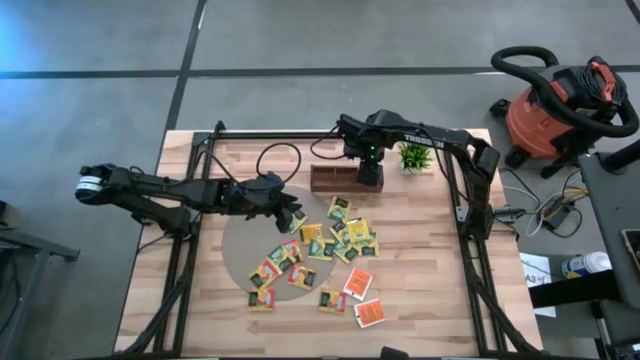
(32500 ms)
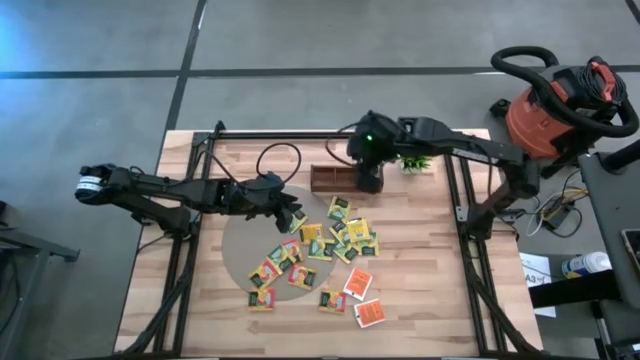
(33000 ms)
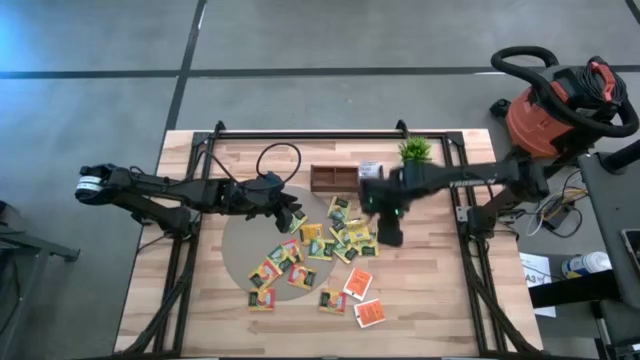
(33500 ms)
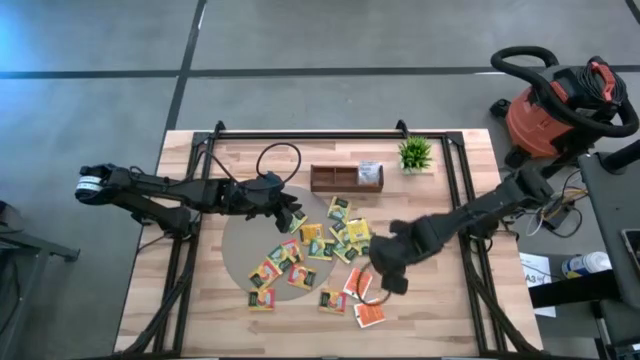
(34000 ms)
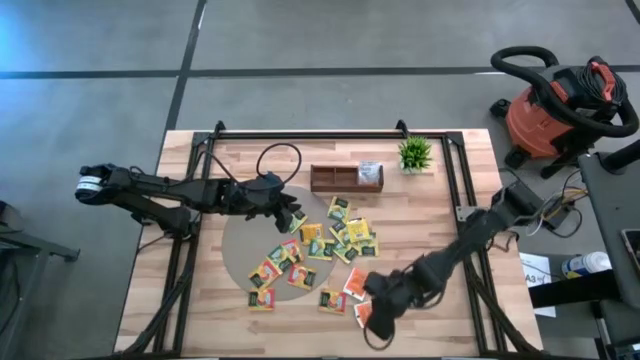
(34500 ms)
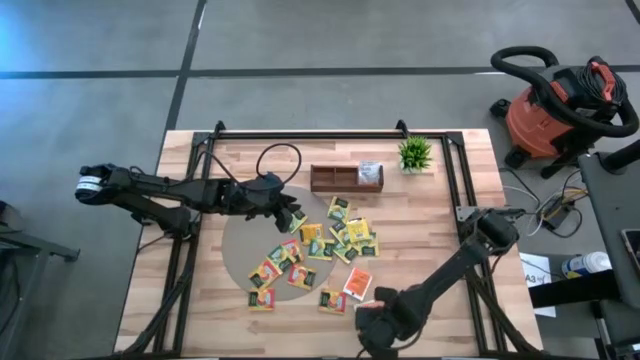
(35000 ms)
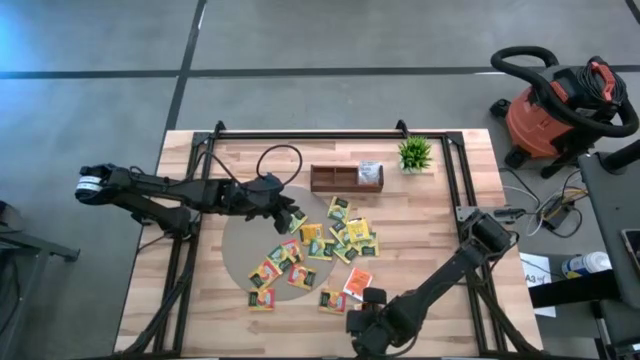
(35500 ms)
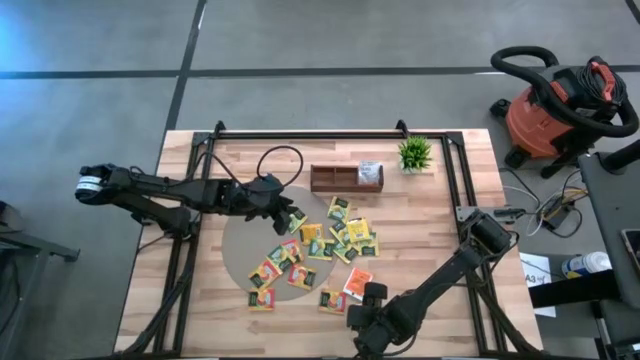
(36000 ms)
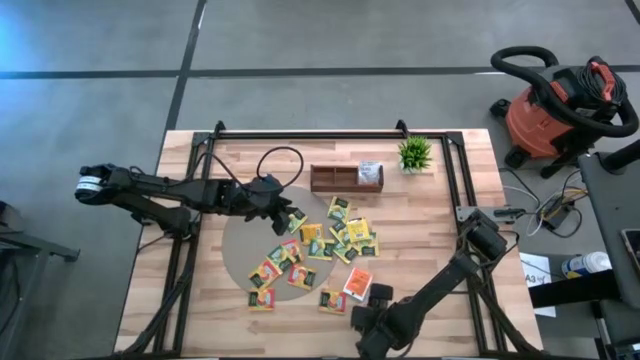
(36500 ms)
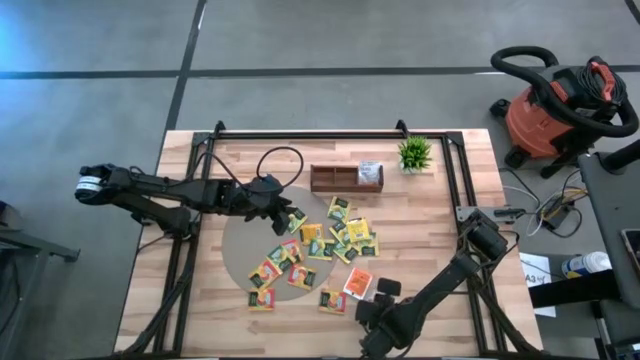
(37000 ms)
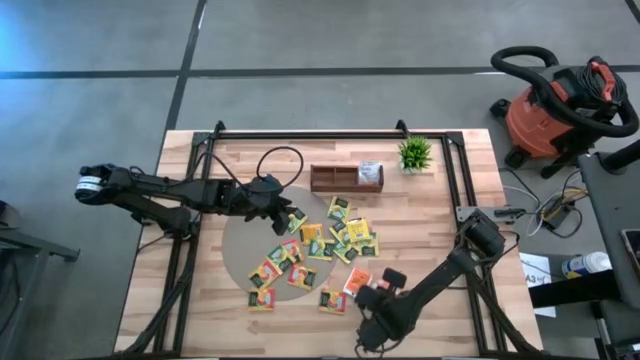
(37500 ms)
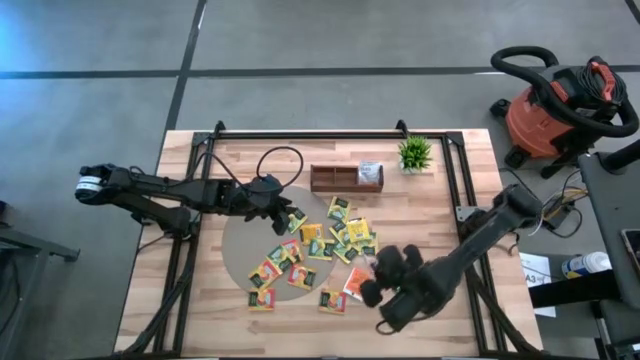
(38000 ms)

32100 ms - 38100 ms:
Task: Pick & Place Tea
Put the orange tea sachet into the right compartment of the wooden organizer

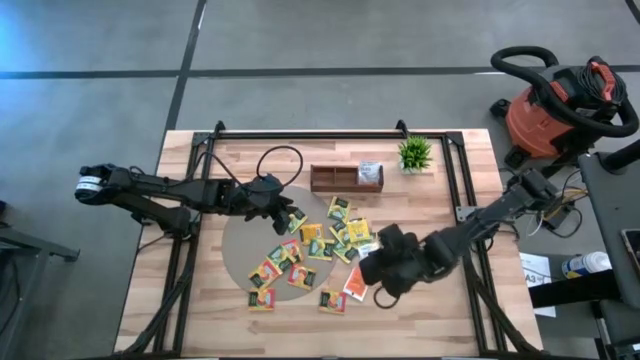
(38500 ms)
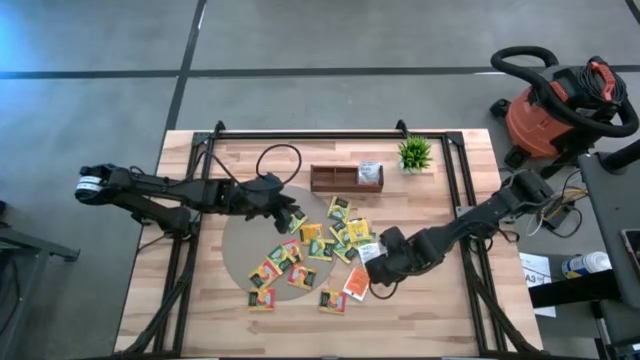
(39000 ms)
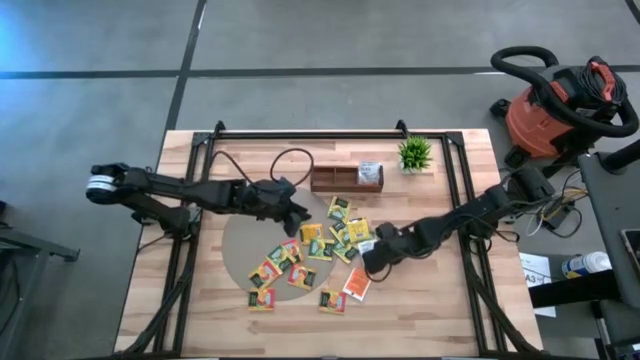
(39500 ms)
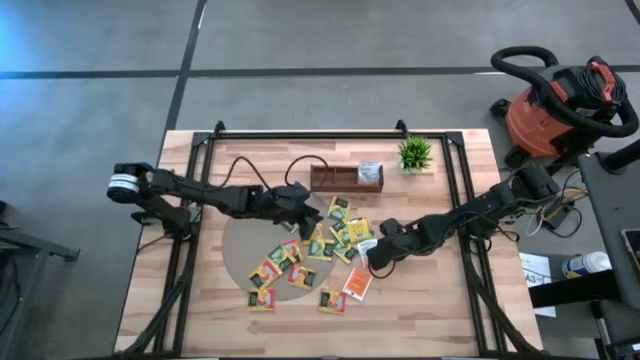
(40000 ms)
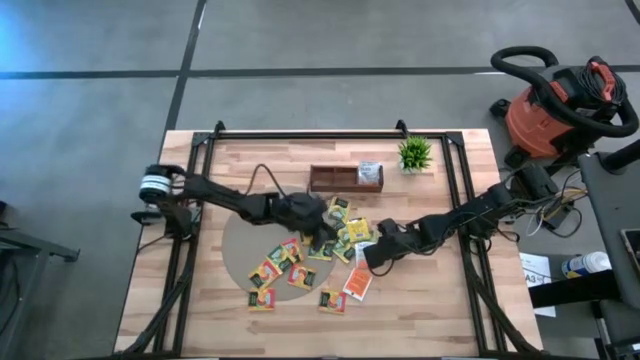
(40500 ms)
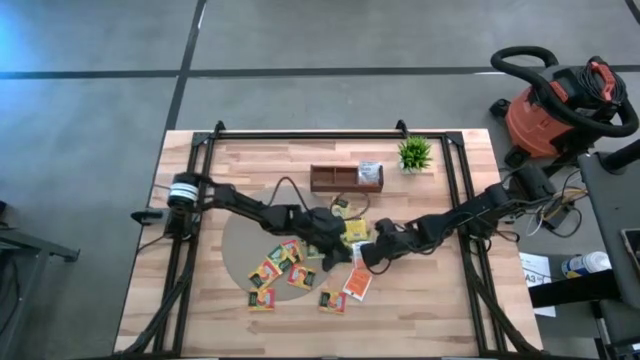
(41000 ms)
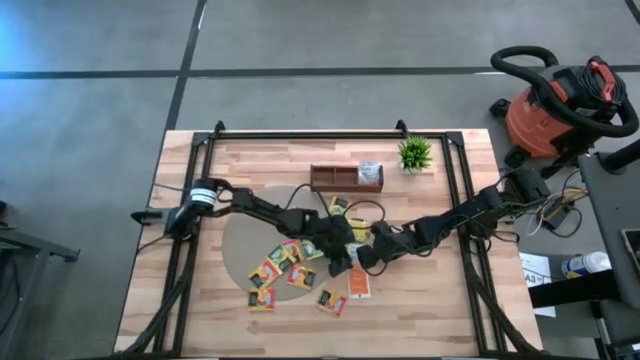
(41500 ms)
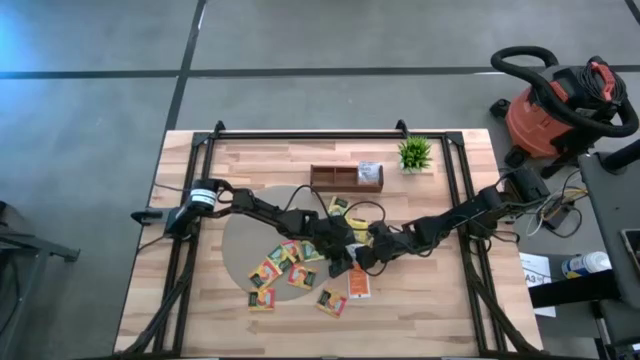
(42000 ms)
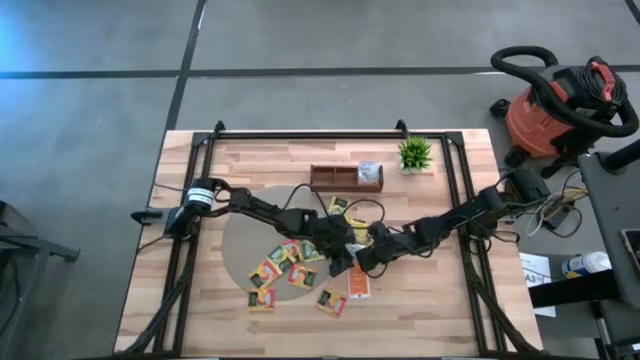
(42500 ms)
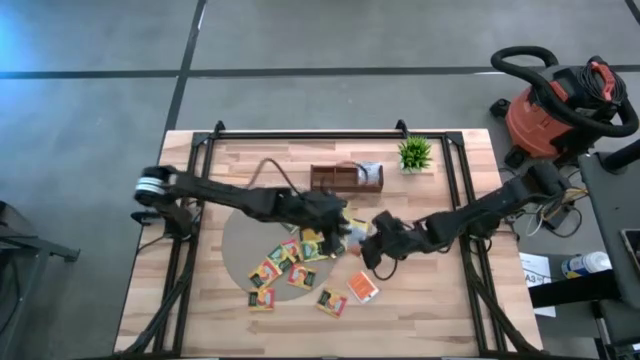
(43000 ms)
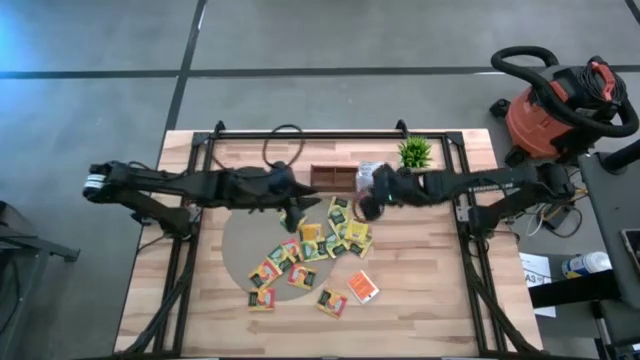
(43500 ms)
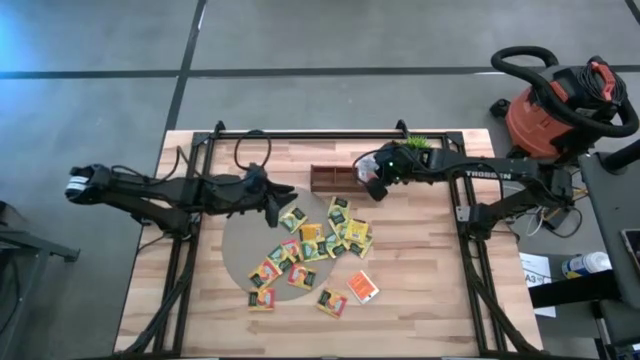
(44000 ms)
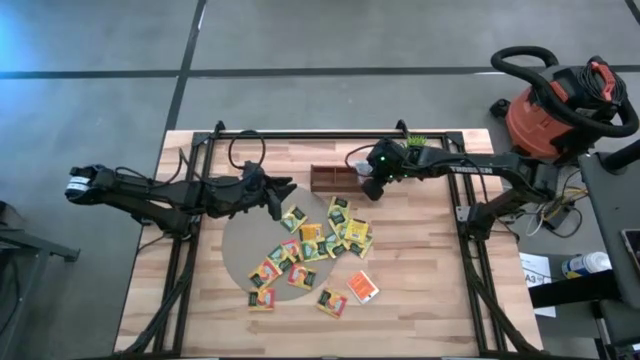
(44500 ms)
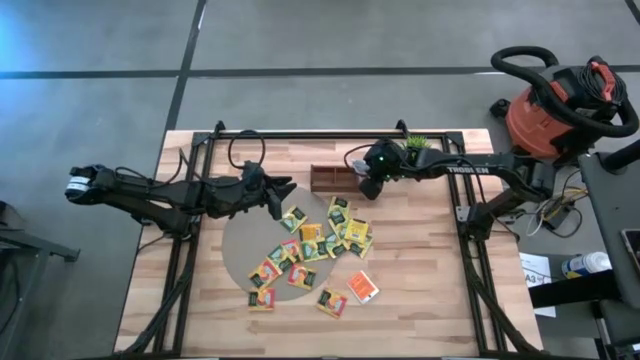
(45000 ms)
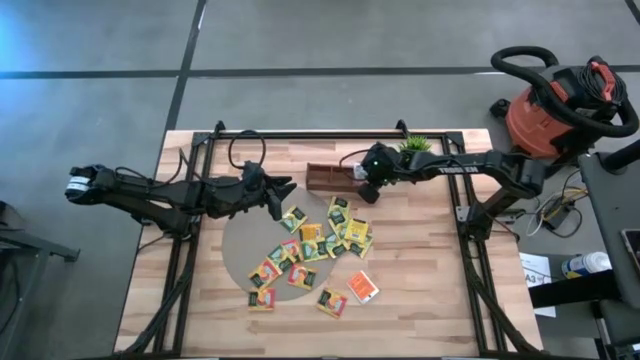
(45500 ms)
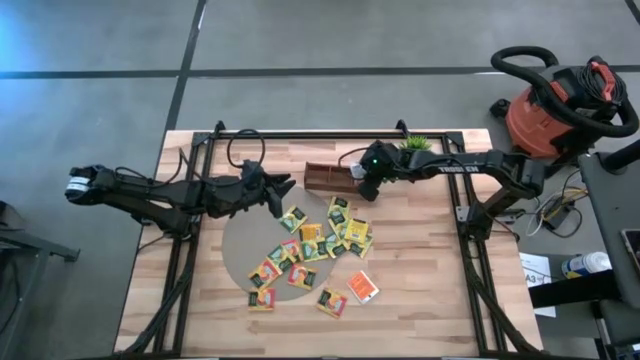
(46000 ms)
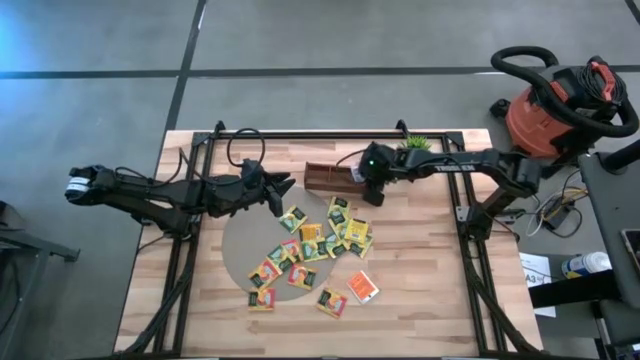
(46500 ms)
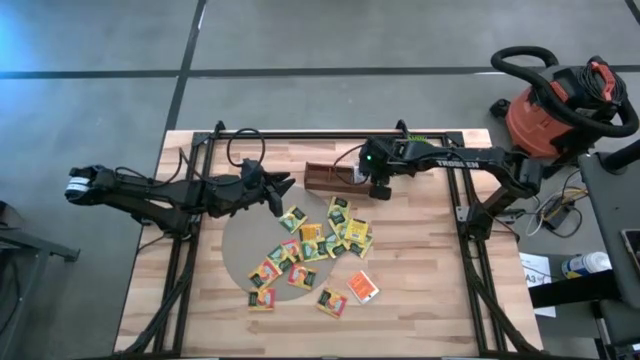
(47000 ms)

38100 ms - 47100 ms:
Put the orange tea sachet into the right compartment of the wooden organizer

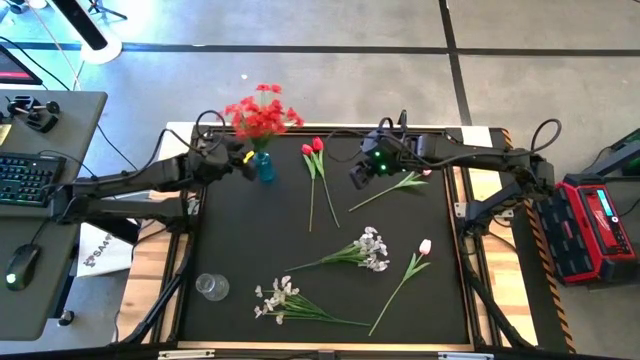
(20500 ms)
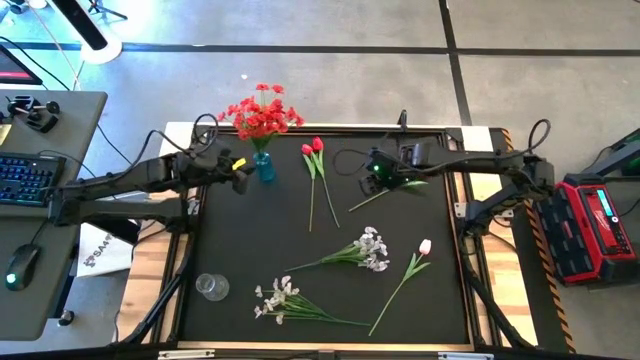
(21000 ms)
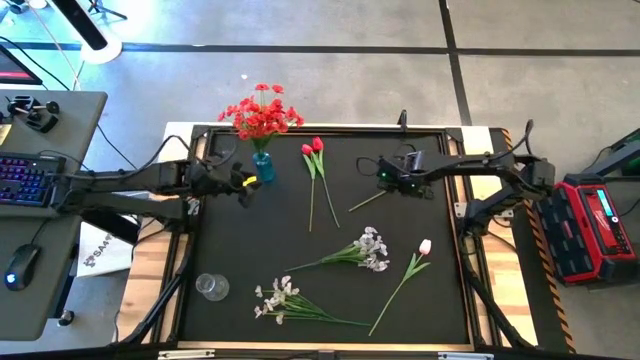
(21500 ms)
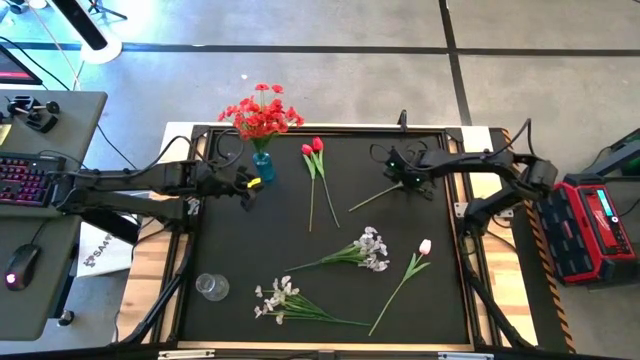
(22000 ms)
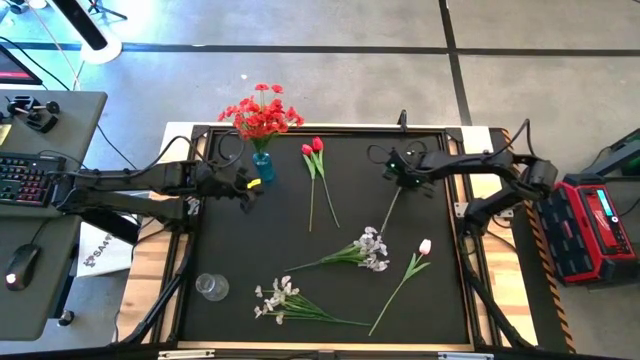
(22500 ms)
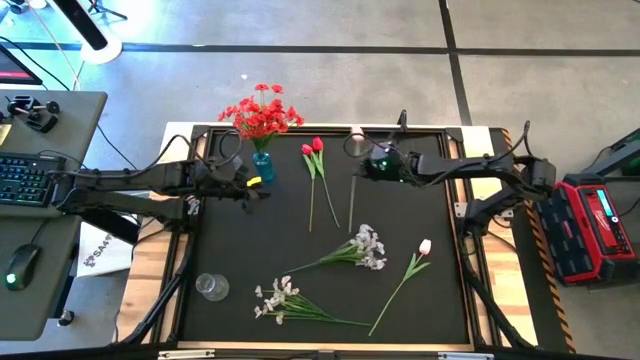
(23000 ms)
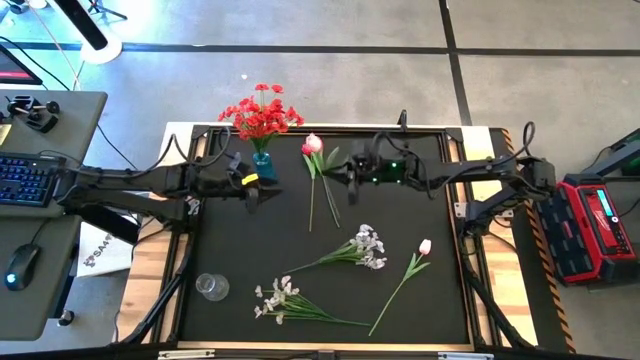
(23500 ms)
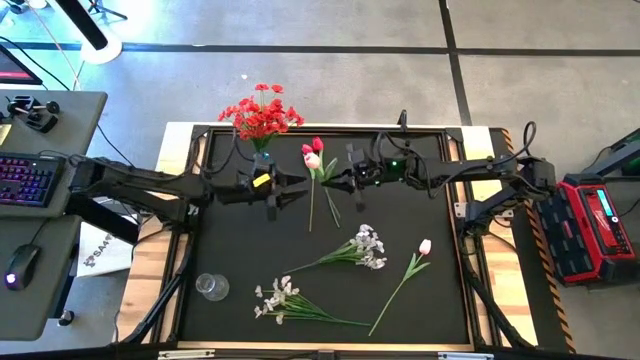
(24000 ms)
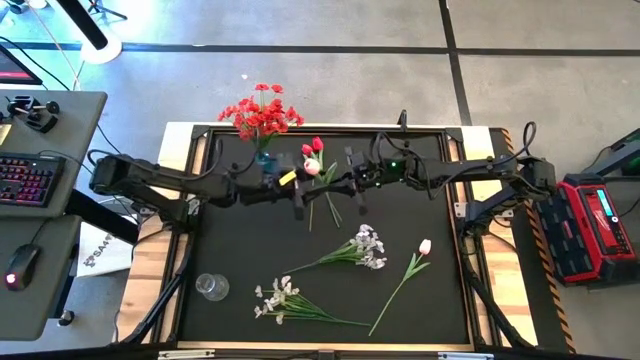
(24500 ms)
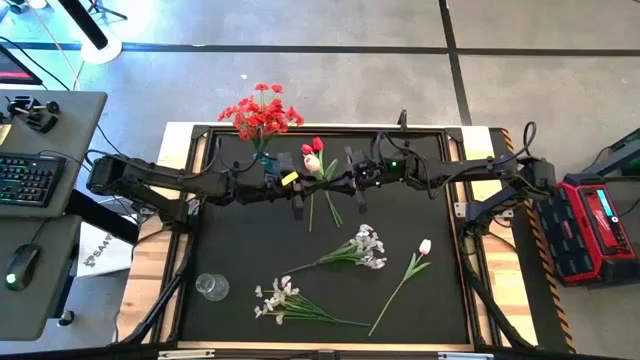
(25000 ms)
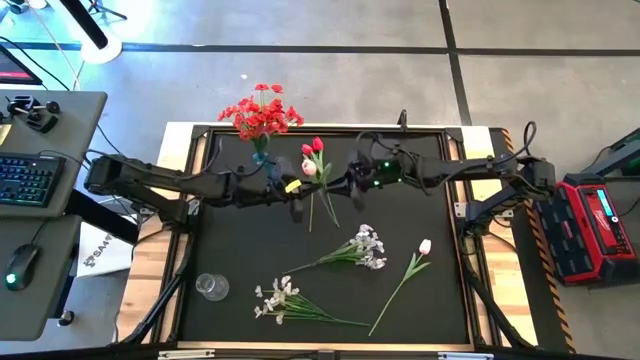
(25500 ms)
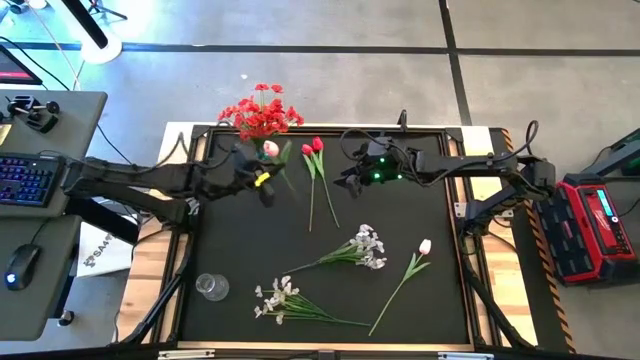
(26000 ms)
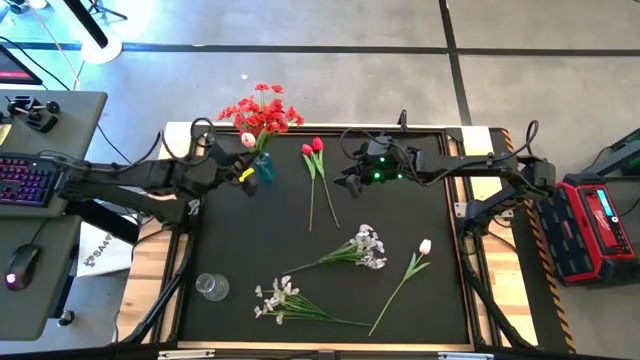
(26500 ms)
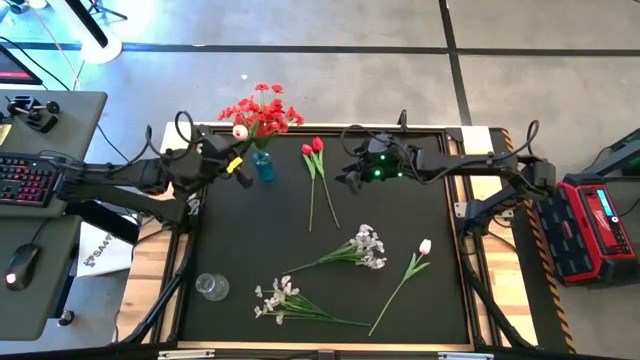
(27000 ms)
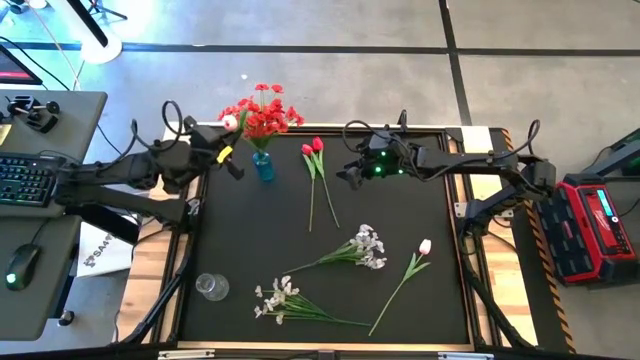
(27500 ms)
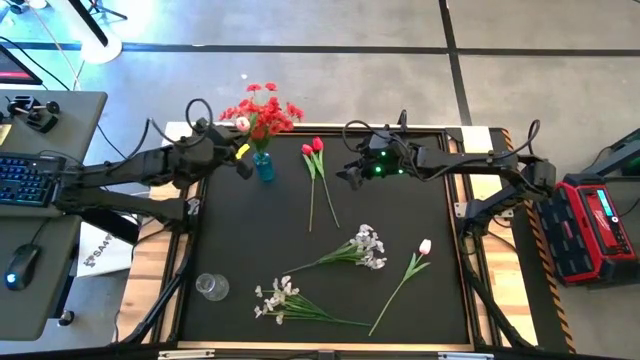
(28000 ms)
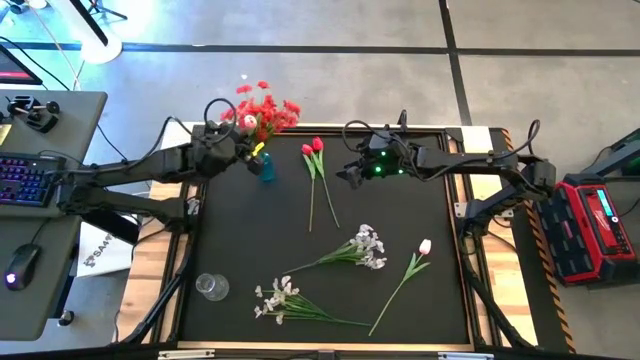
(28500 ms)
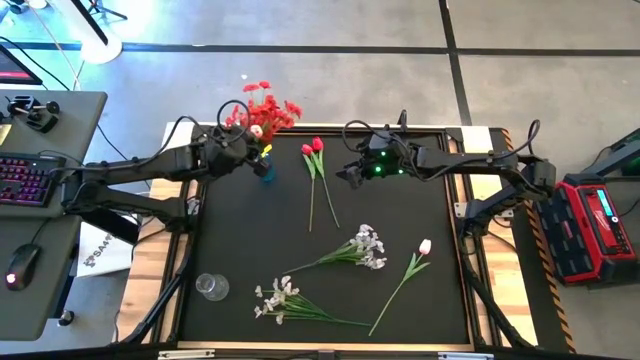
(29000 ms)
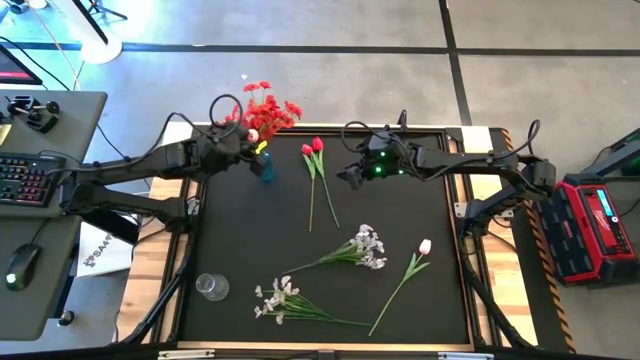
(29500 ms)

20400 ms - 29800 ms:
Task: Sort flowers into vase by color
Put the top pink flower into the blue vase
